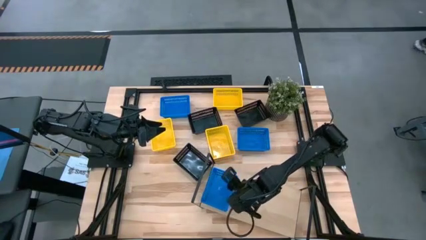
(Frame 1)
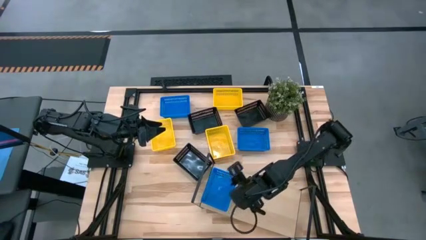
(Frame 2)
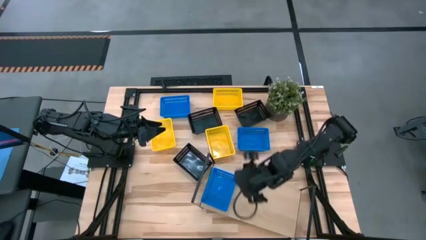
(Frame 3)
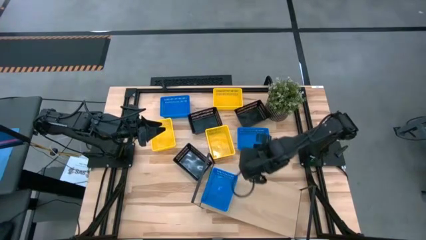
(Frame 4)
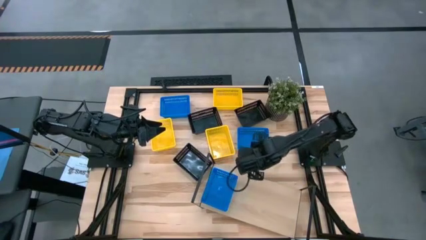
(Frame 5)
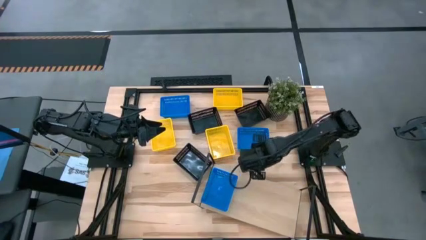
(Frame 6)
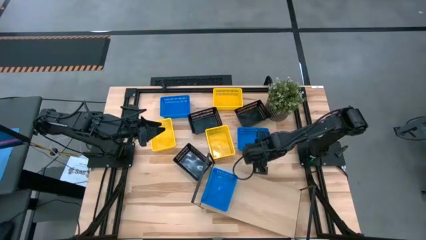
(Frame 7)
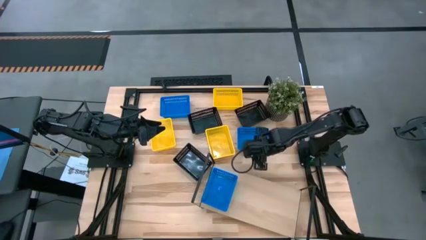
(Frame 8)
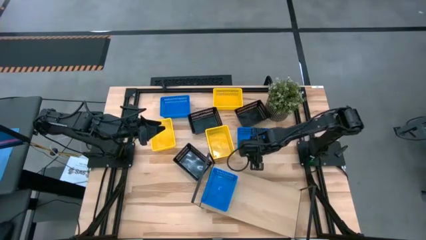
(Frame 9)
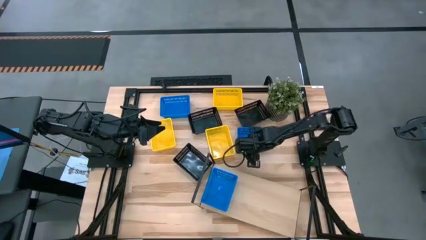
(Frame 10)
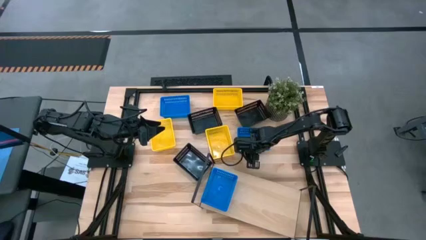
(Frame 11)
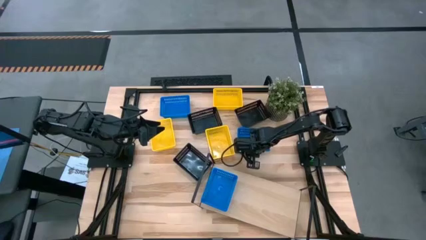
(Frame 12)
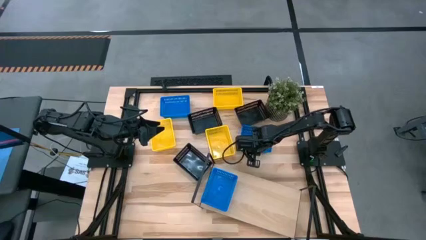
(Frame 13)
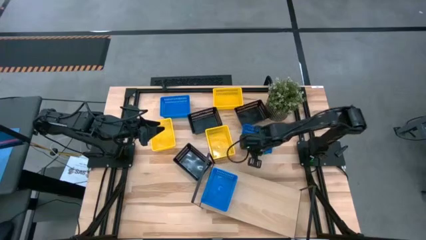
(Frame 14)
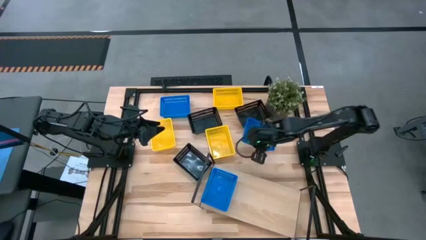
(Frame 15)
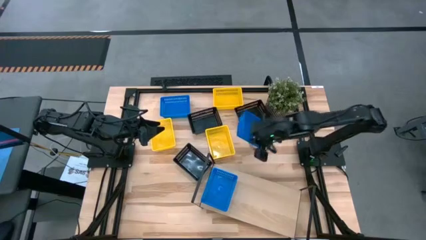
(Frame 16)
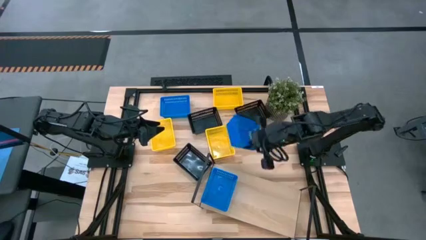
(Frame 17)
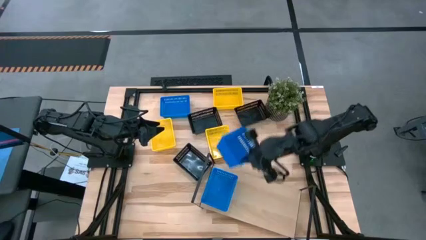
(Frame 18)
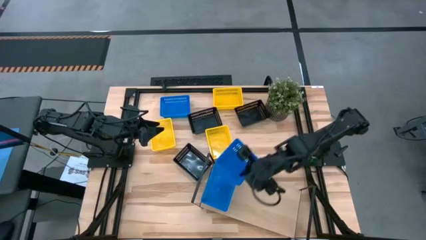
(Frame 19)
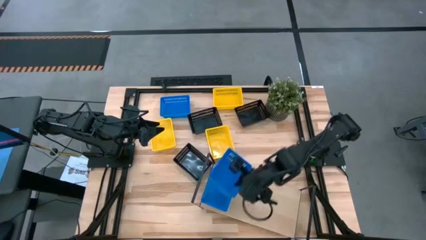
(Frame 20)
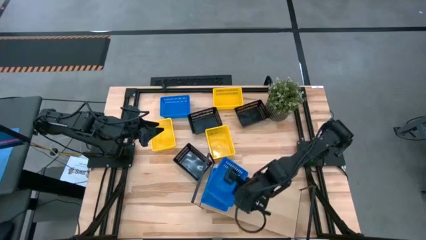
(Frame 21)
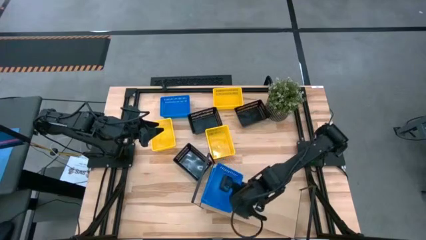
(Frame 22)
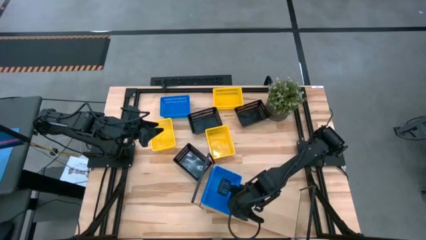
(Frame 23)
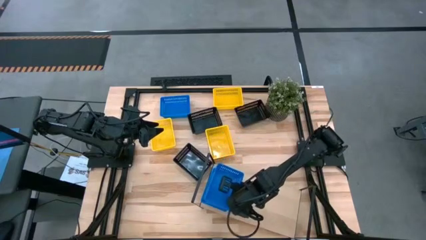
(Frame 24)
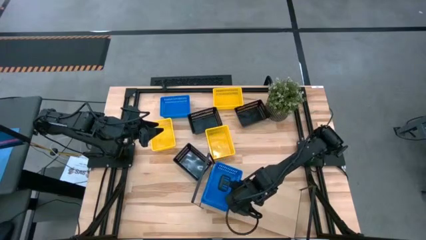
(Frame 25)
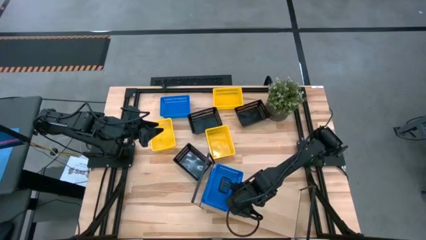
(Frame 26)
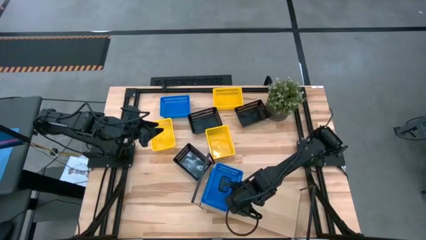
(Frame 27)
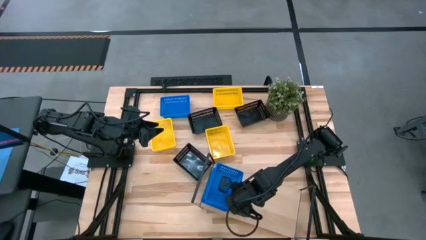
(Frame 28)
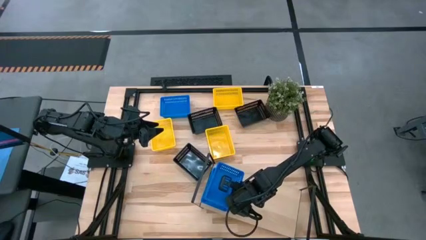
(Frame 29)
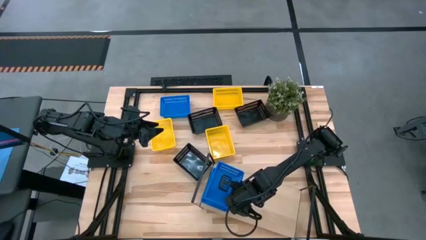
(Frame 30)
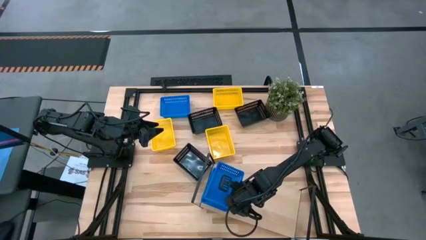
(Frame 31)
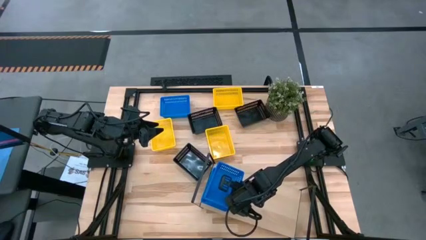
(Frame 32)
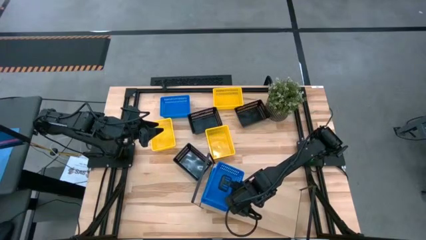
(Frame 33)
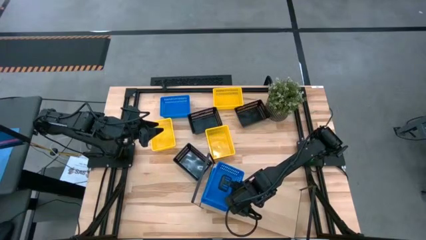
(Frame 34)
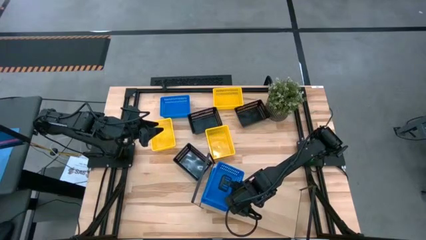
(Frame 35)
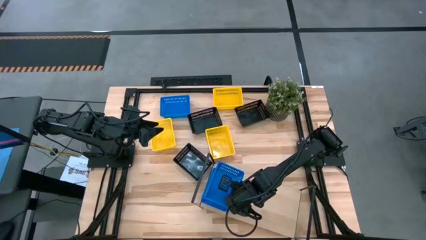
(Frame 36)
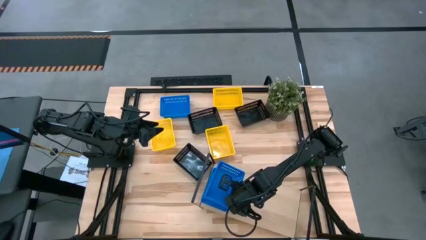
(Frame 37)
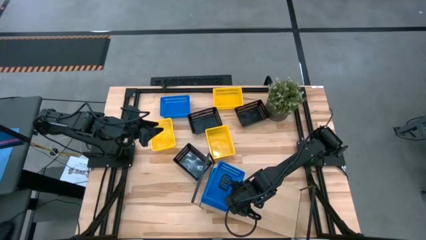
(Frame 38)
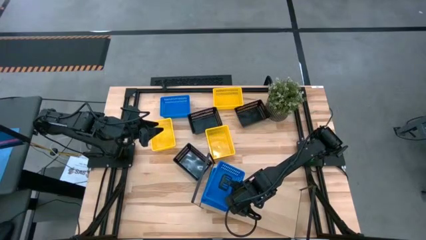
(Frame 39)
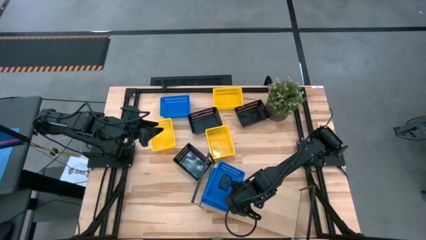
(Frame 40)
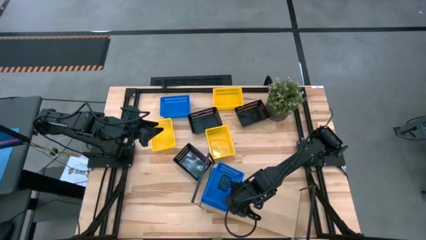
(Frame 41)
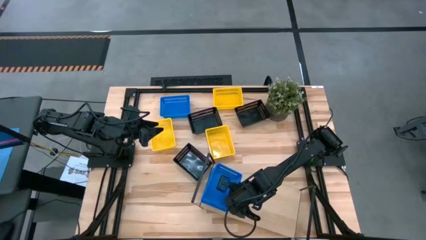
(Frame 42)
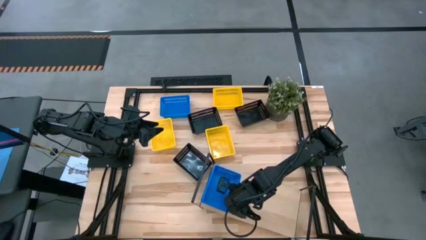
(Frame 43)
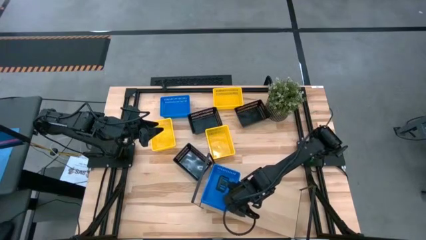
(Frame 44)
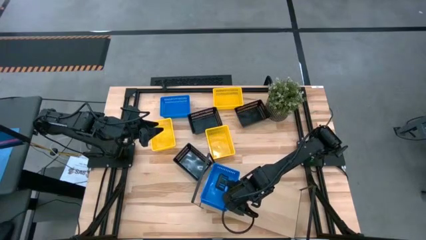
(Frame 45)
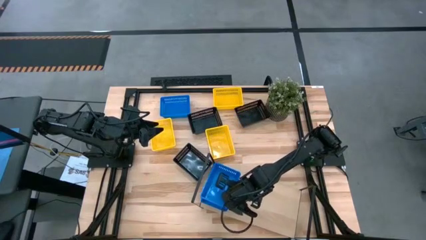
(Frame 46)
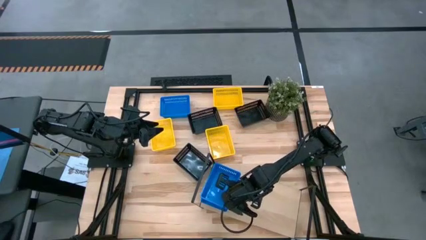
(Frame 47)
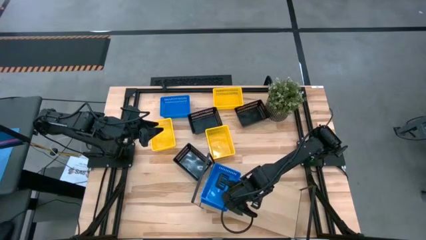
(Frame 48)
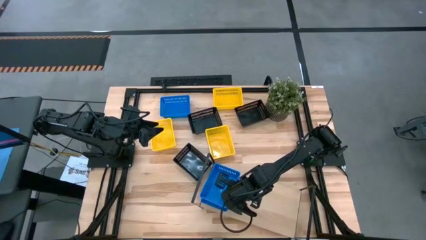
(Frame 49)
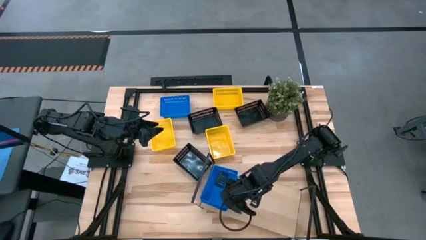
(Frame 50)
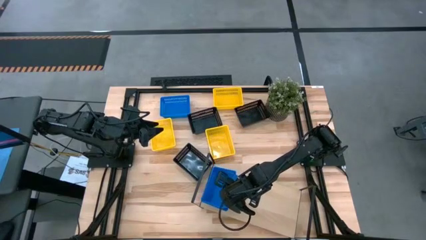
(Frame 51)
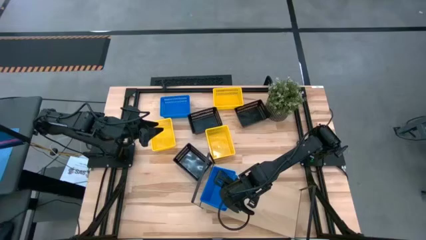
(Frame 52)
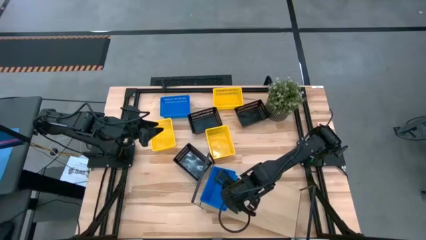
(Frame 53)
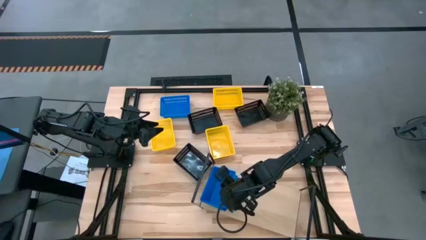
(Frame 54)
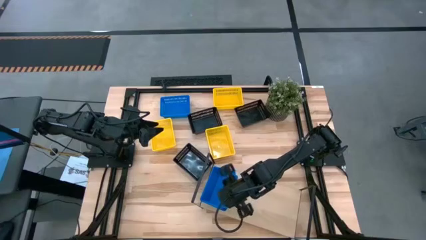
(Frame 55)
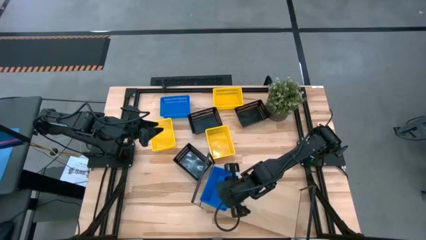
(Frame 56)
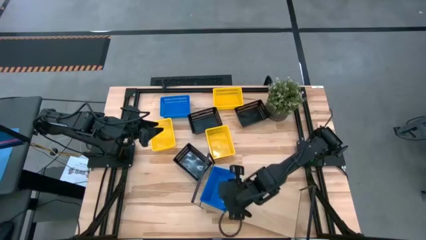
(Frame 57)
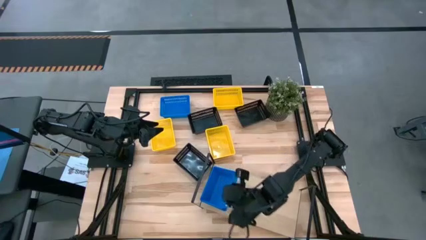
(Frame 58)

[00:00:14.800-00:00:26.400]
Task: Stack baskets on shelf by color
Stack the right blue bin on top of the blue bin on the shelf

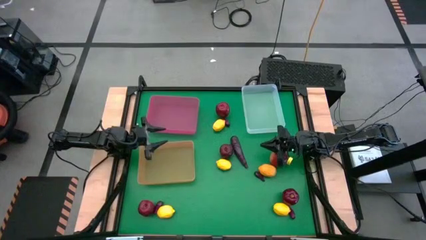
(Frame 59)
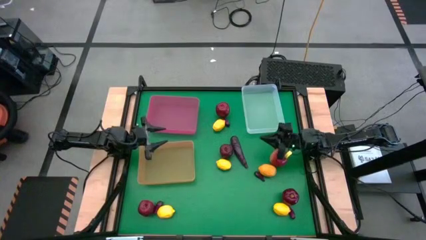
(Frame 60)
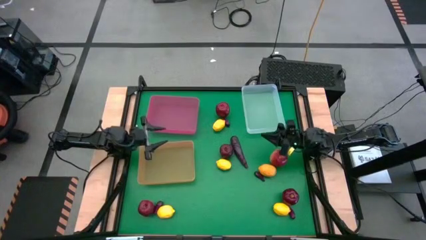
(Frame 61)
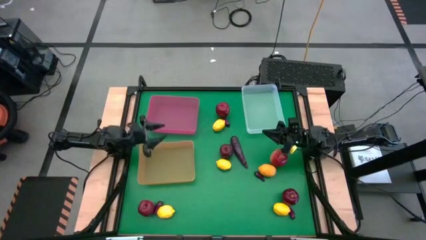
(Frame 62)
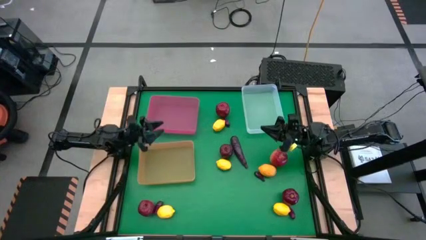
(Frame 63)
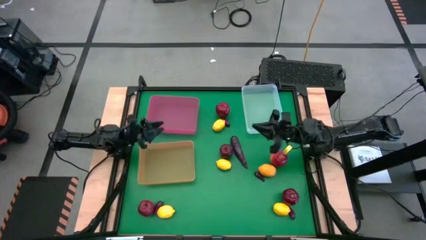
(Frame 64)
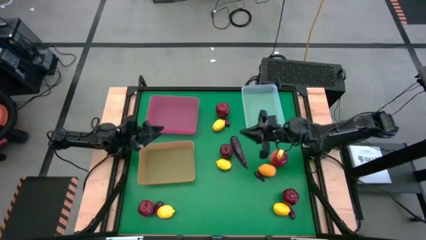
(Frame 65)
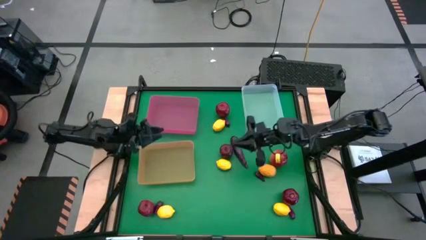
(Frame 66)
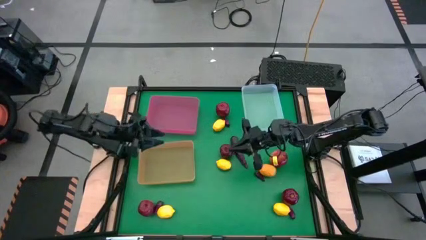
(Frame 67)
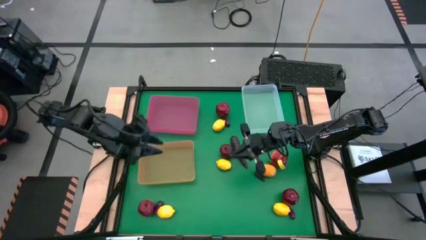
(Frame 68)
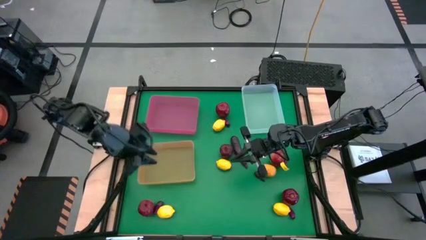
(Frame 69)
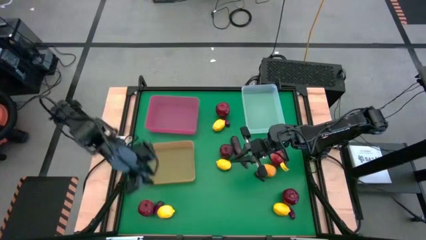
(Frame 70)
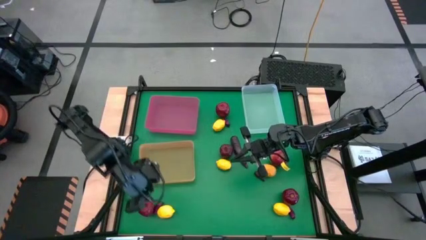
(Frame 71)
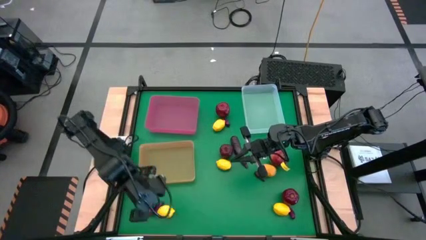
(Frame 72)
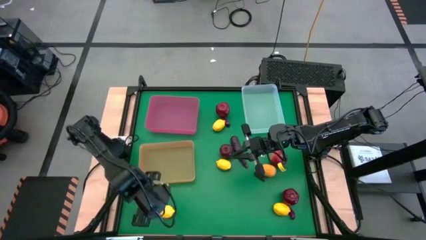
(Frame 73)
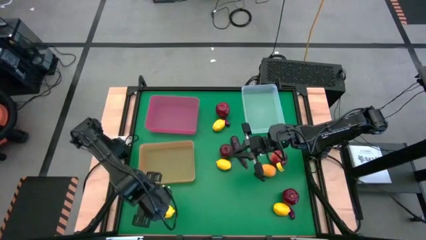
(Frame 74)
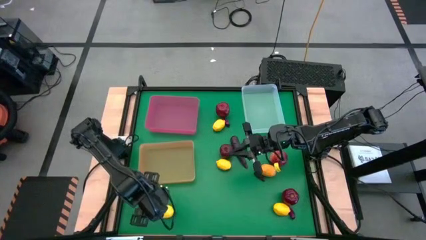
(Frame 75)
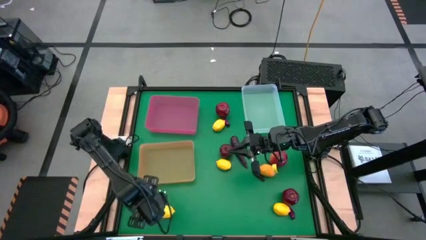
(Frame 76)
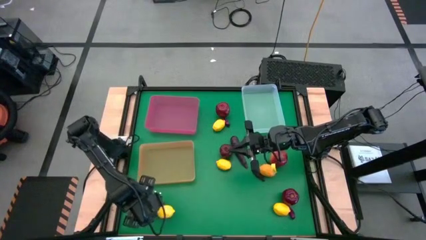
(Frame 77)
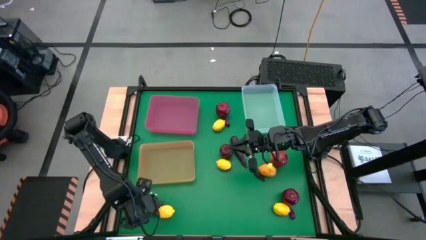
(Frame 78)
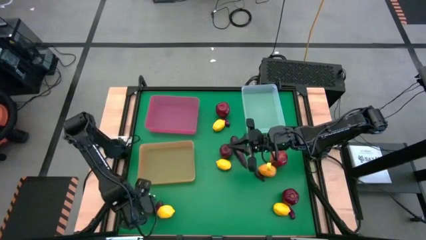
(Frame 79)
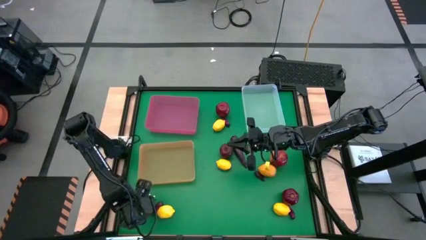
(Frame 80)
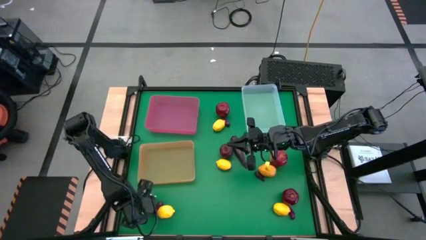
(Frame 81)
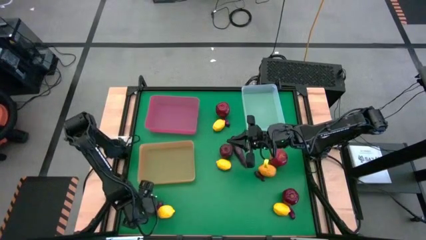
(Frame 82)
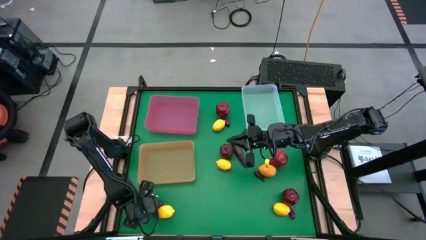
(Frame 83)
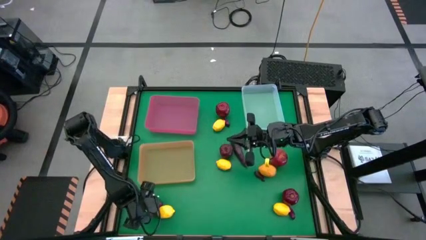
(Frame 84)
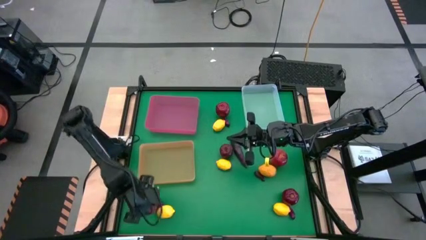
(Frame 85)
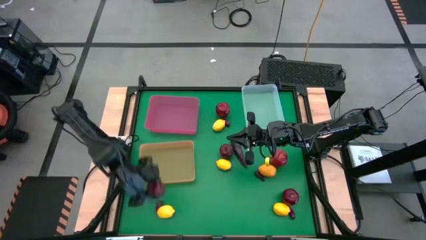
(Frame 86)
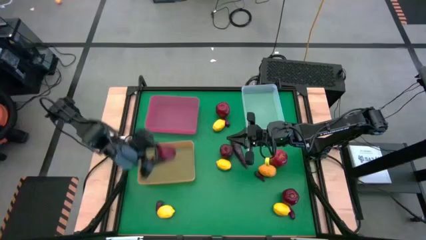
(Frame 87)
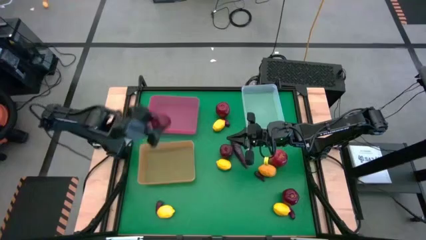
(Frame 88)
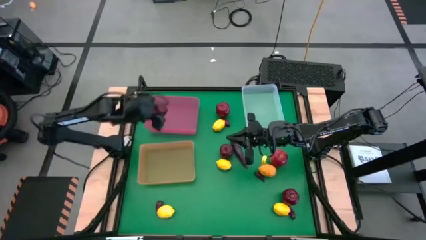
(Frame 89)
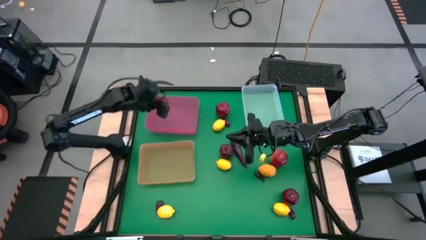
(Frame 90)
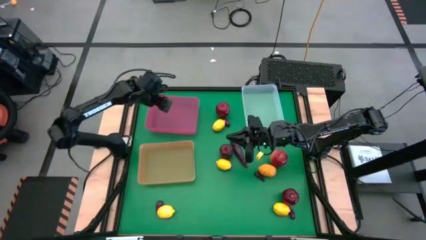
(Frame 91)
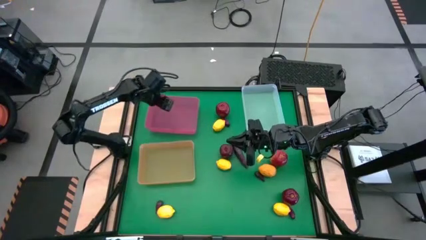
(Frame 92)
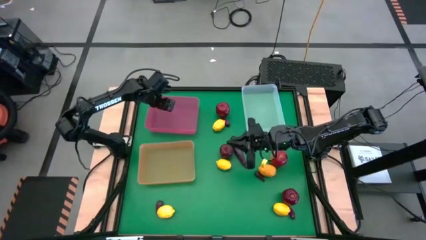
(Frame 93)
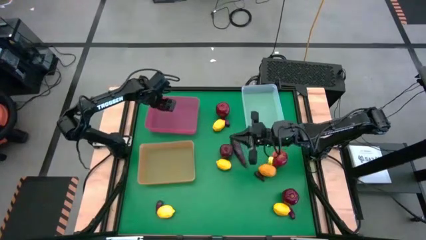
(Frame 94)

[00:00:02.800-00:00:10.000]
Task: Sort produce into baskets
Put the apple into the pink bin
